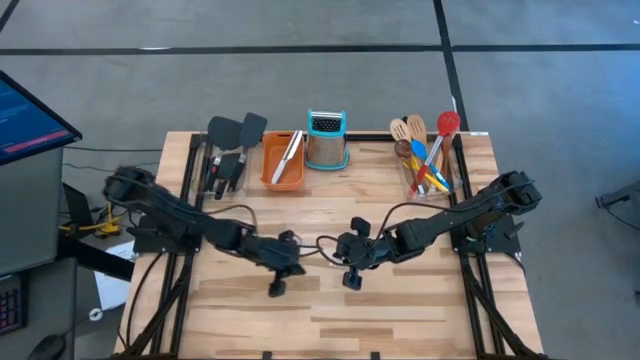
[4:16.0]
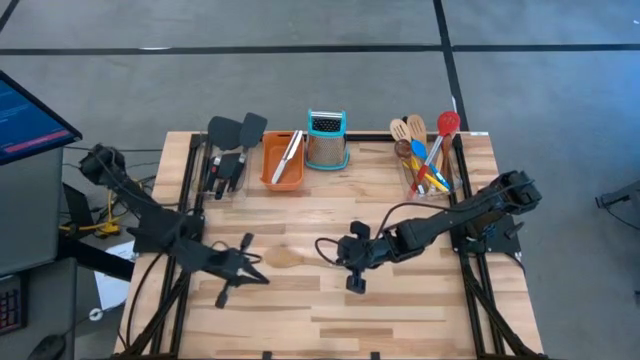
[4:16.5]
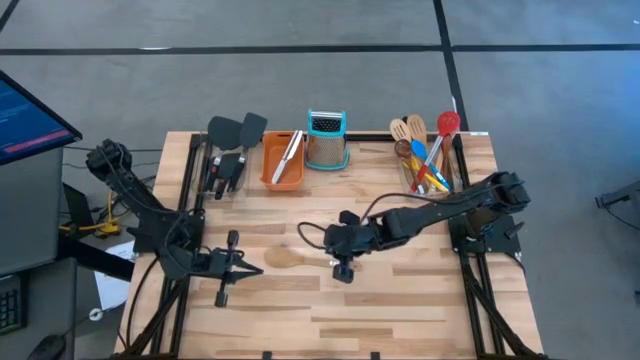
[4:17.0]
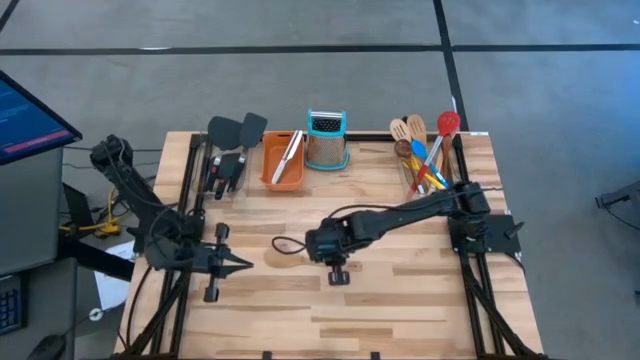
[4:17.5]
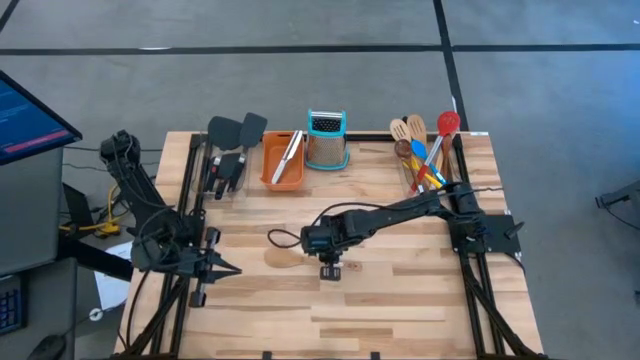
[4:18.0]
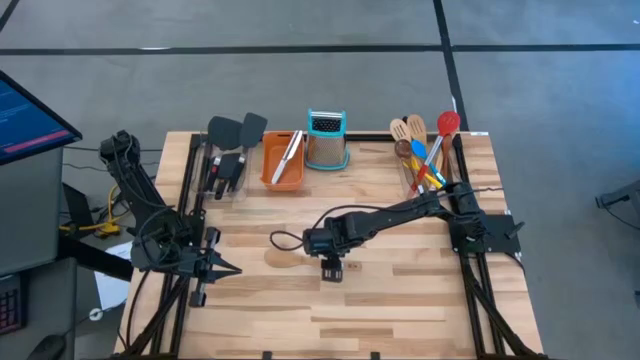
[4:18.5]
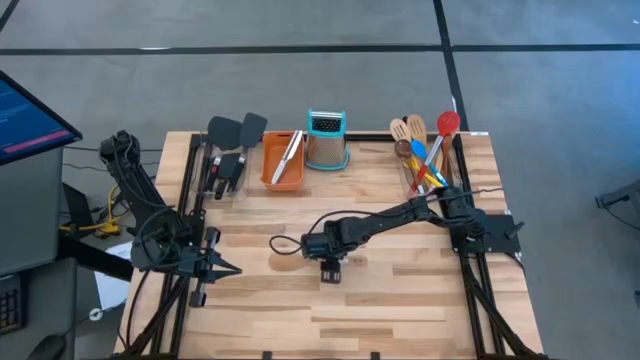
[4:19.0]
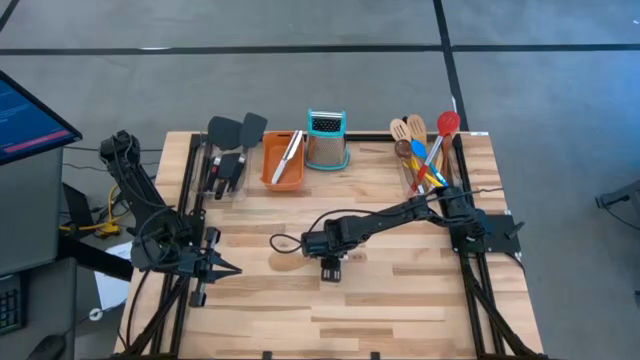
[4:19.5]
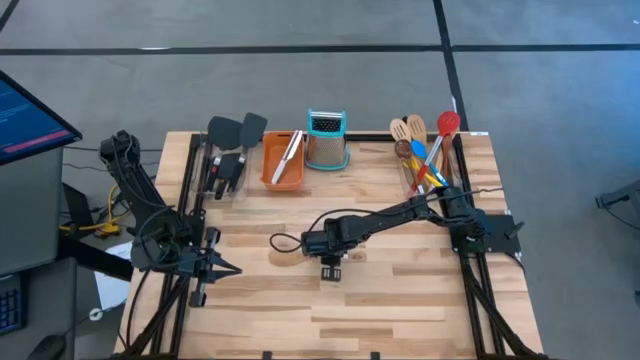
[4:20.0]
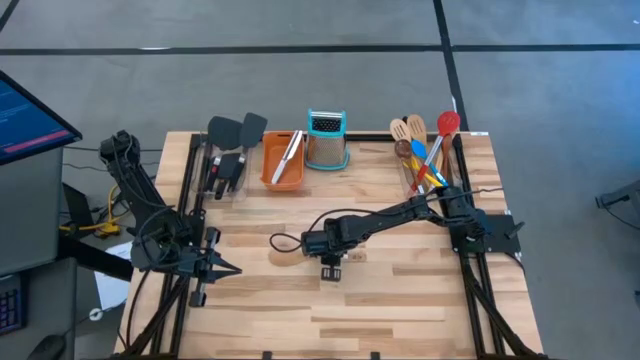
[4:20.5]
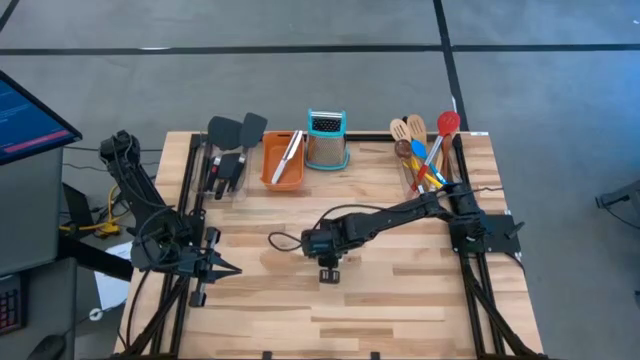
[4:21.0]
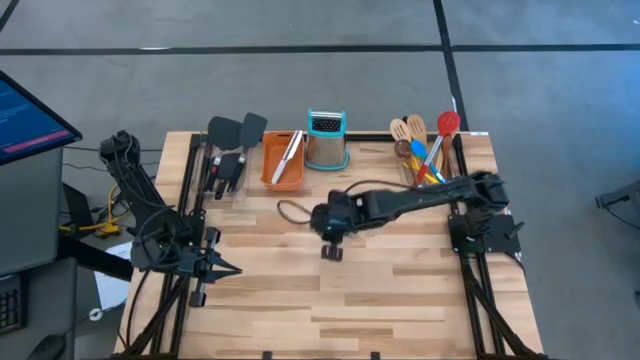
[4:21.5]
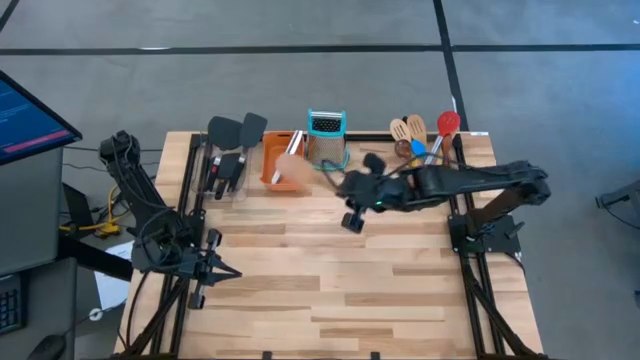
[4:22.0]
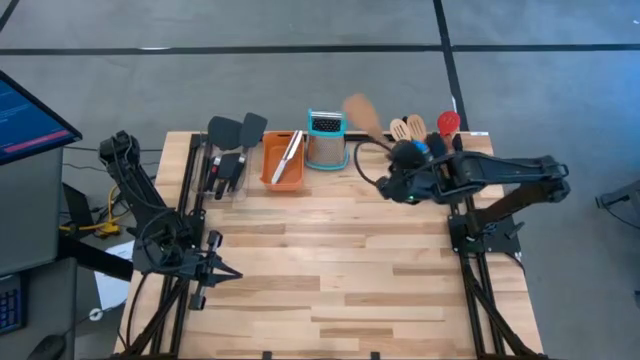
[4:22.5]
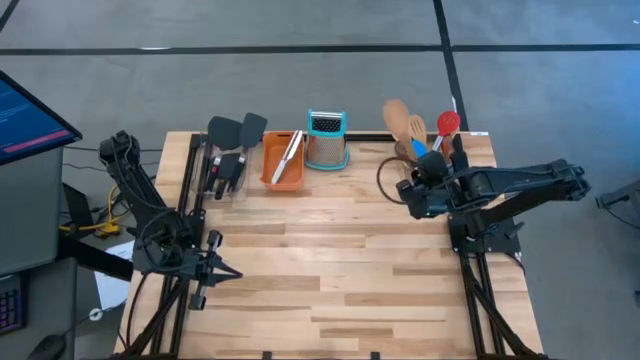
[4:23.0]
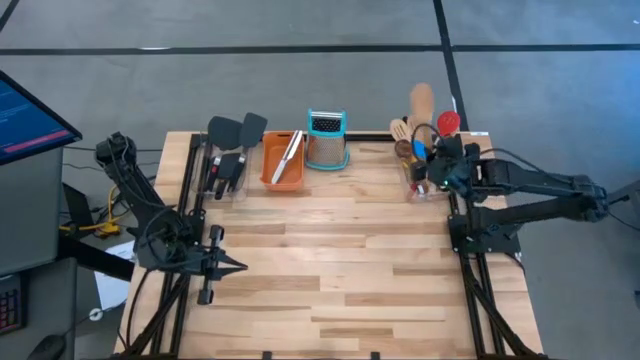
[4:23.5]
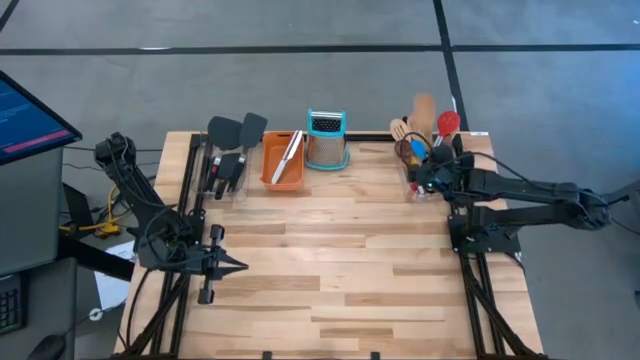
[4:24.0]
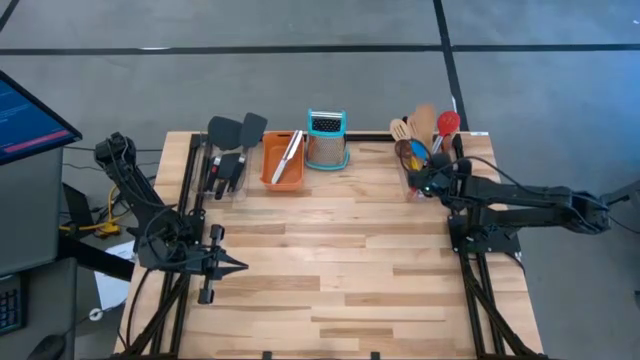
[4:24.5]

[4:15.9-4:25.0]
Task: Pick & Place Kitchen Items
Put the brown wooden spoon into the right transparent bin

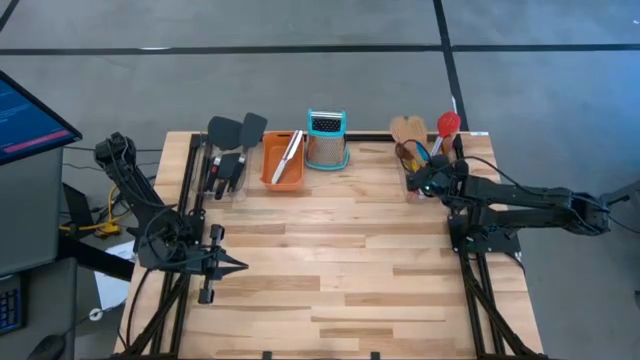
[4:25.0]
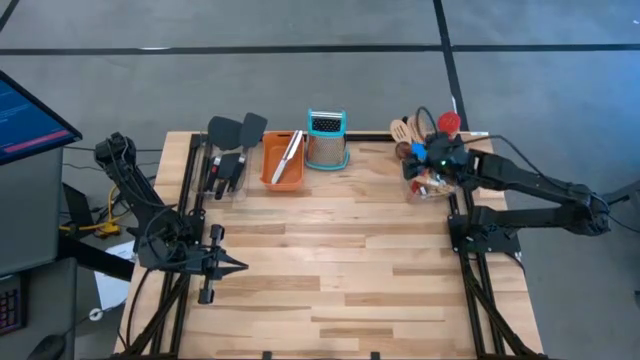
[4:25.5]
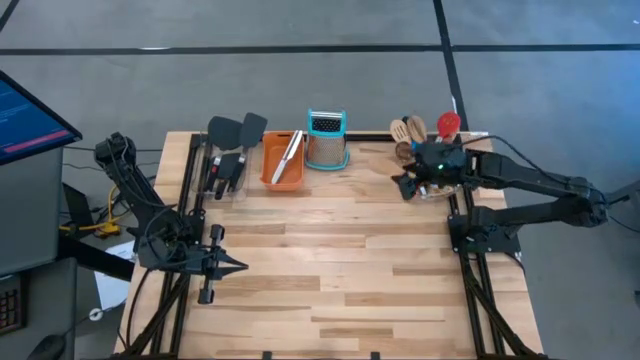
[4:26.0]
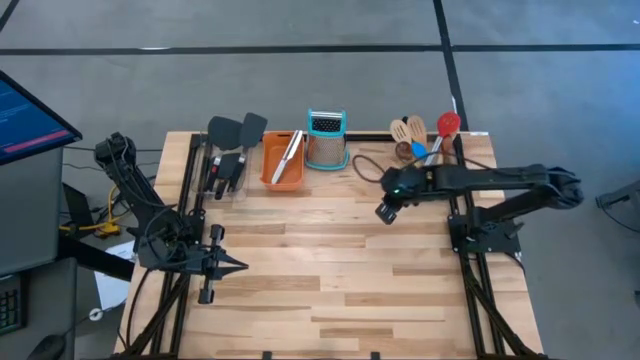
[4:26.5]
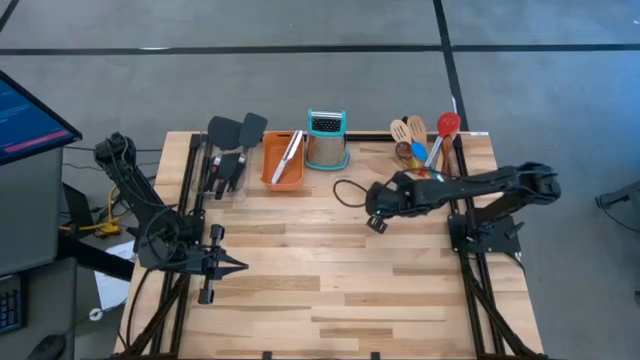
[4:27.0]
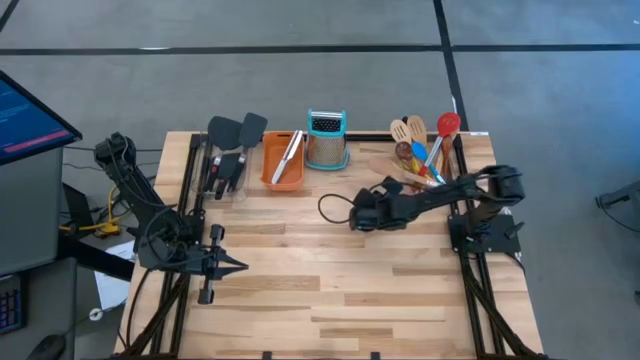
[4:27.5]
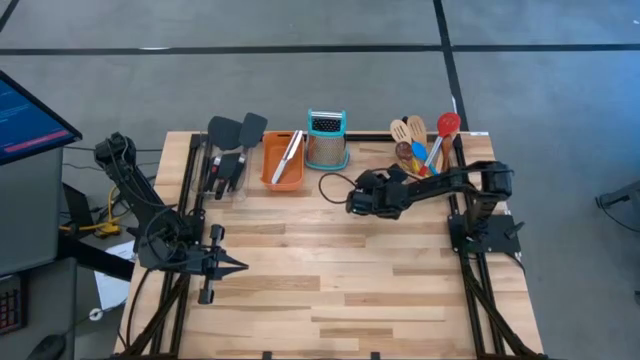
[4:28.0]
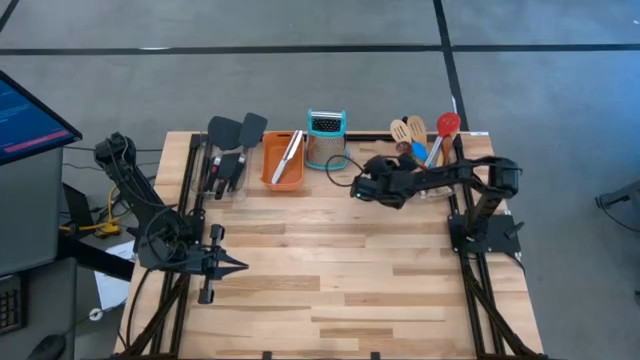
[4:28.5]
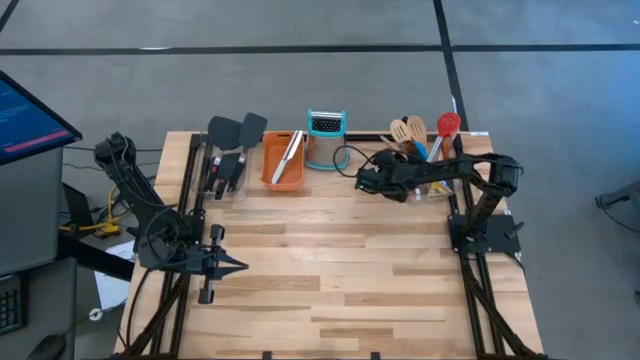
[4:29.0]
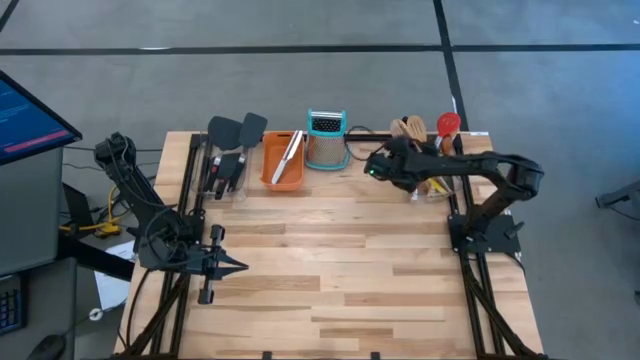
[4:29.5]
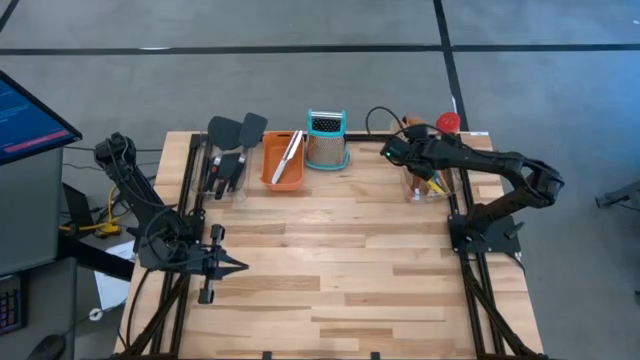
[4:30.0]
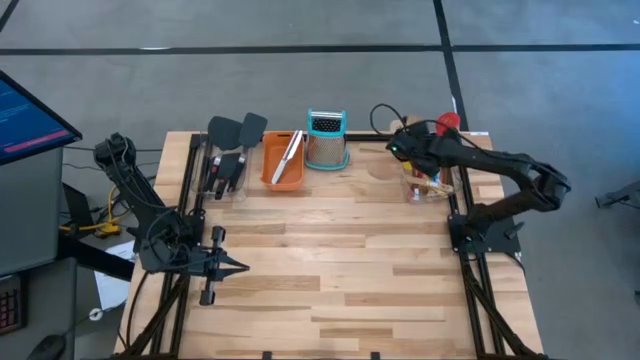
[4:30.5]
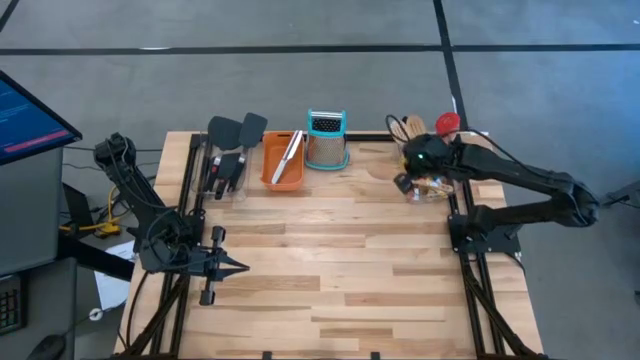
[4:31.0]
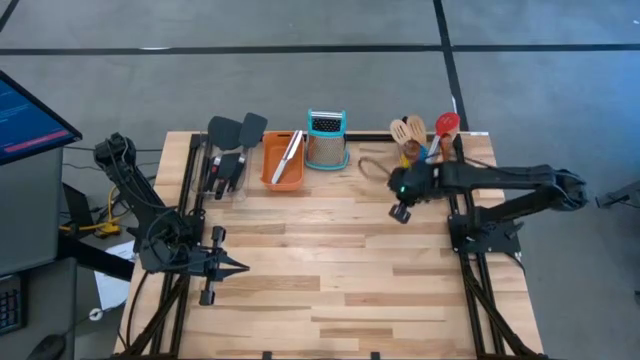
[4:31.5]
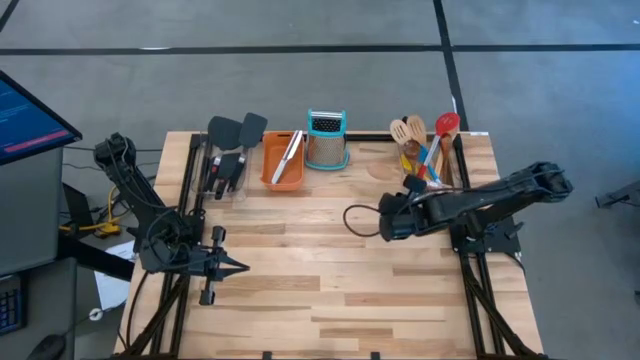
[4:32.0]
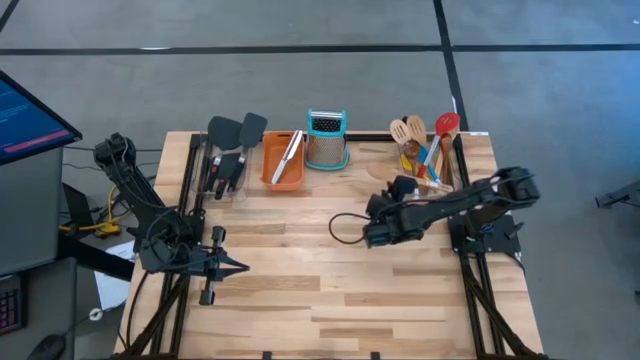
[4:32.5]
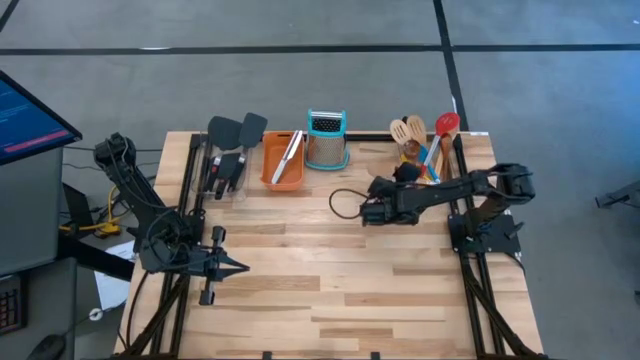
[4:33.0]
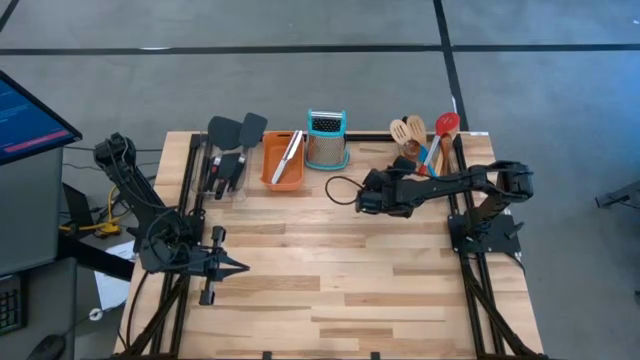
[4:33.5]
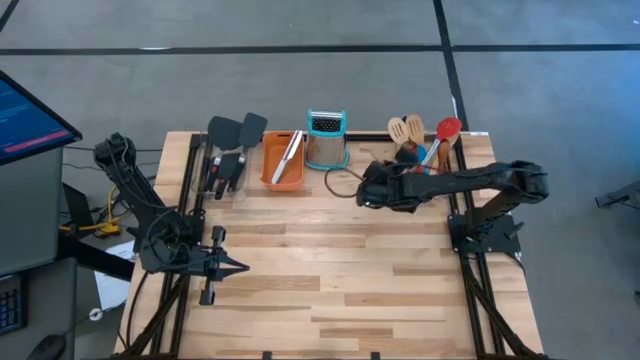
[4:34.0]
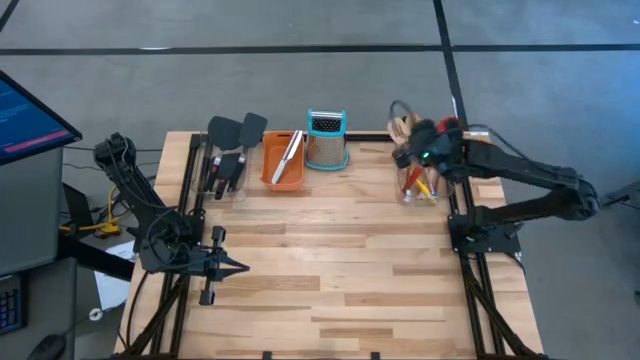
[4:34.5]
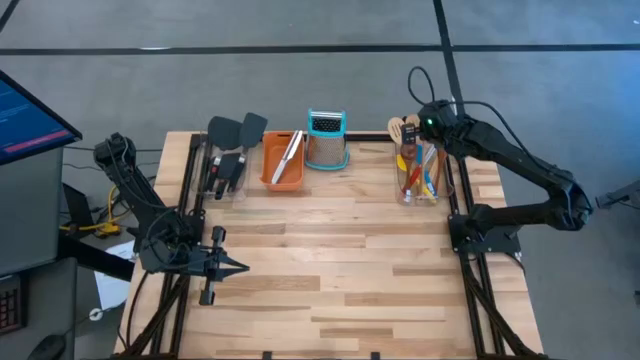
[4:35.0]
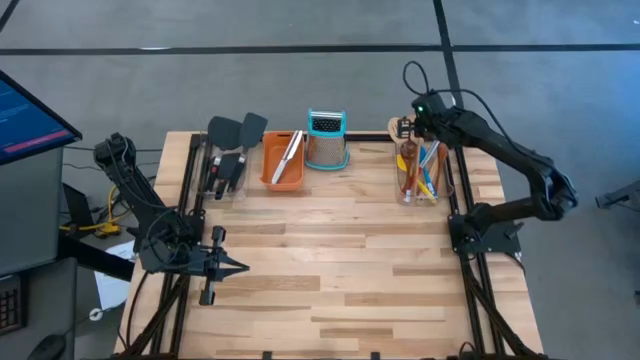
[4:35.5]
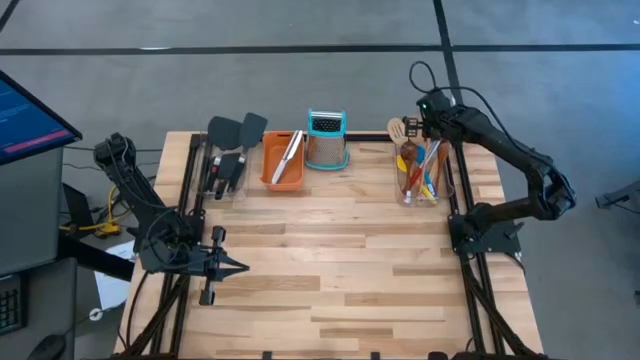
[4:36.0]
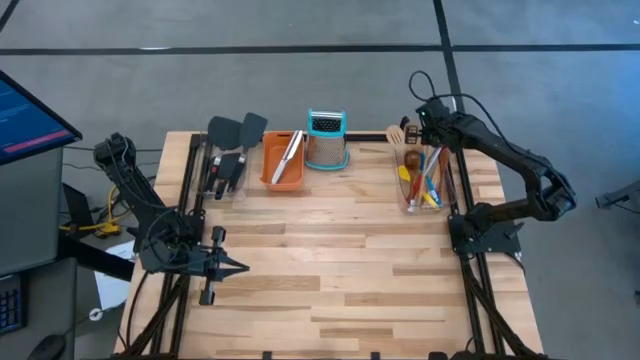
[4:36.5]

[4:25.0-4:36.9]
Adjust the brown wooden spoon
